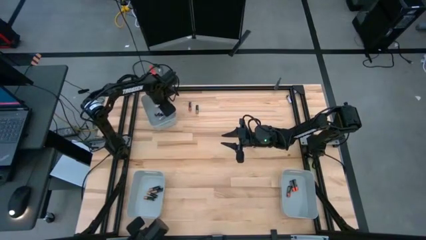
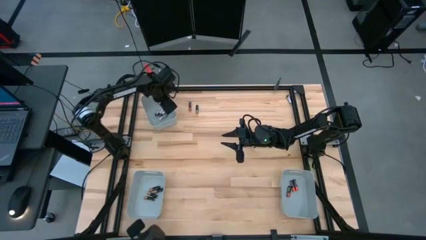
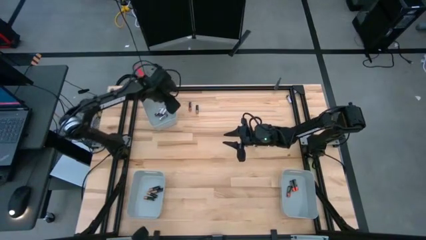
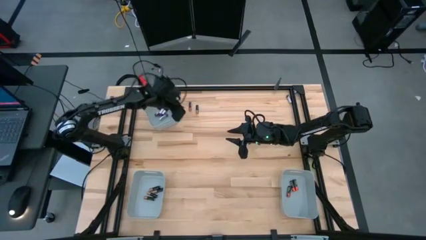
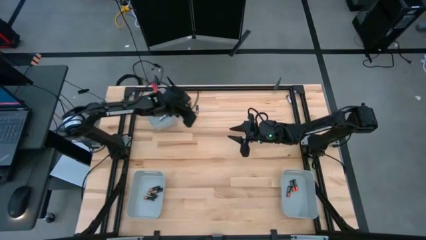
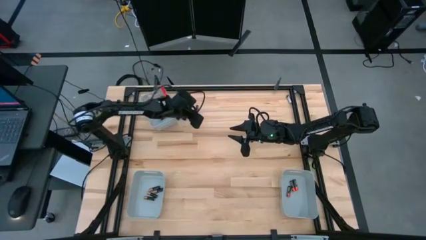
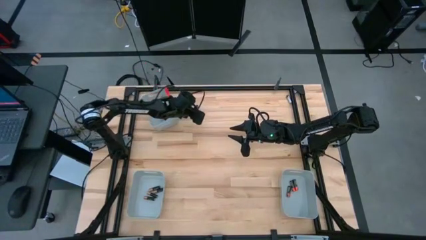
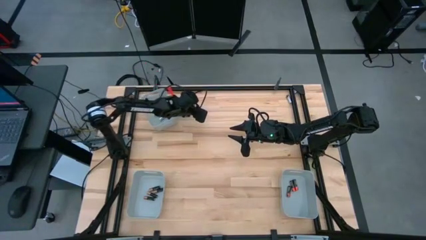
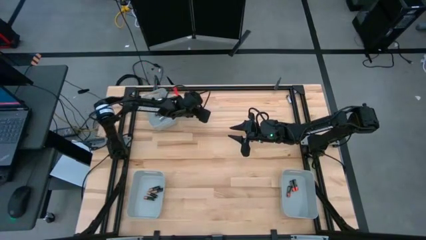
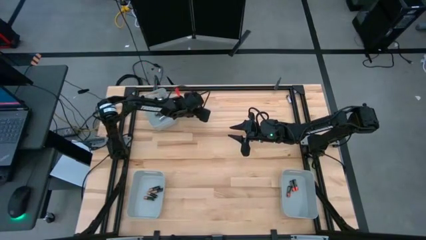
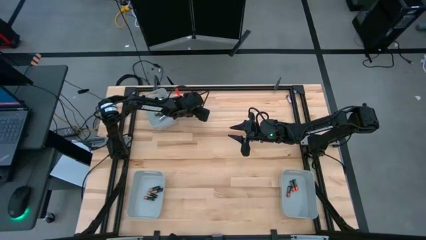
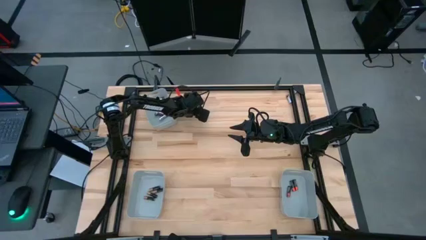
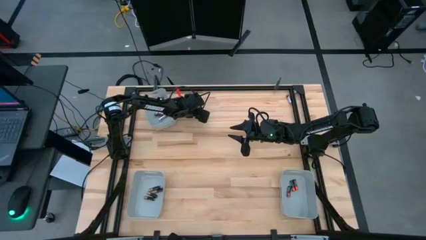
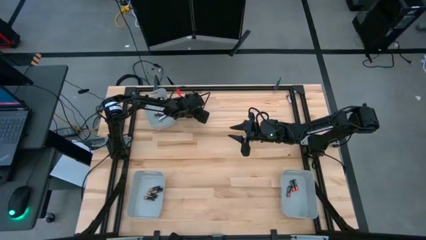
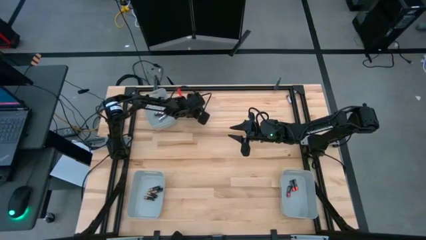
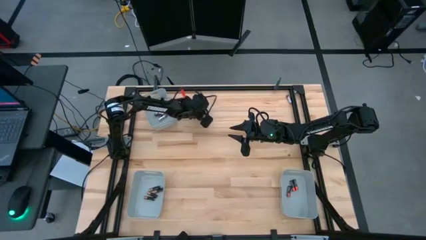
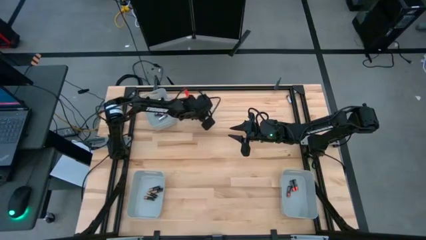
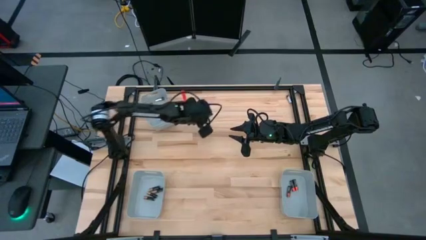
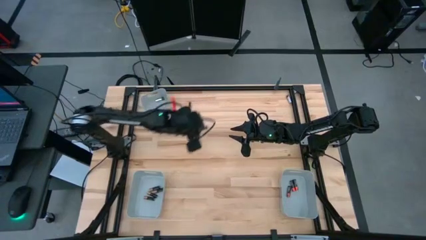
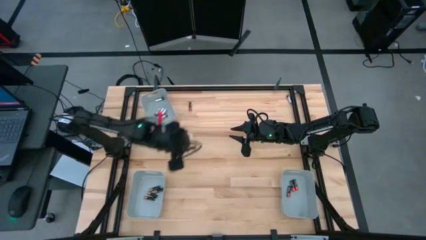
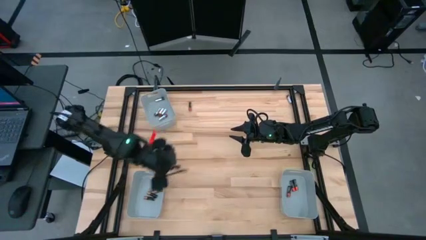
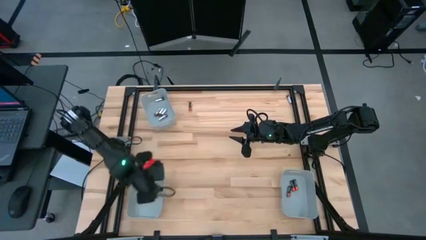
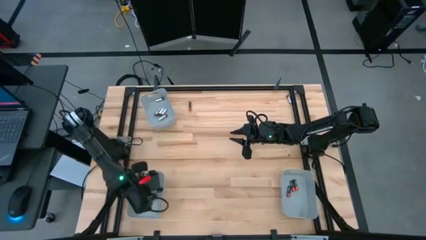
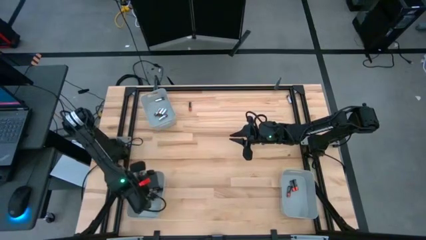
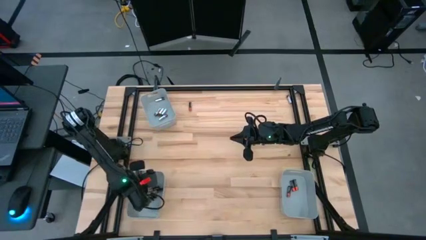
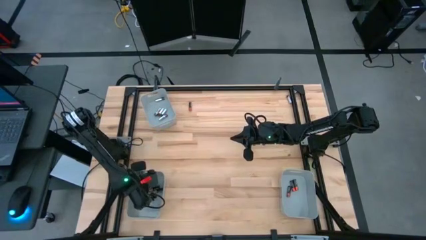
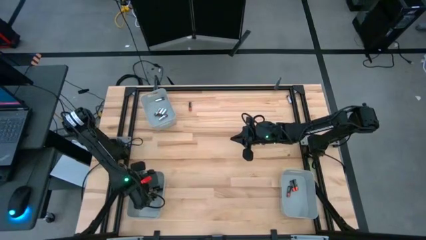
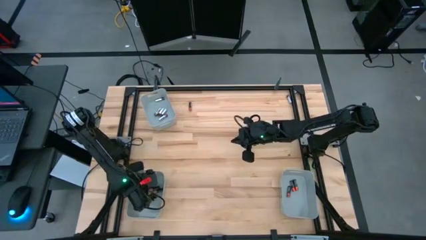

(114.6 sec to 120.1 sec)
Task: Sort batteries
Put the black-brown battery into the bottom left gray bin

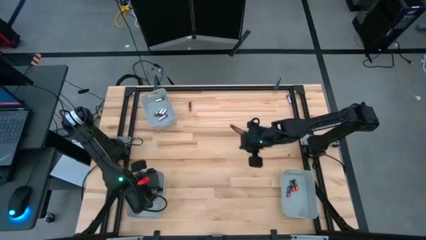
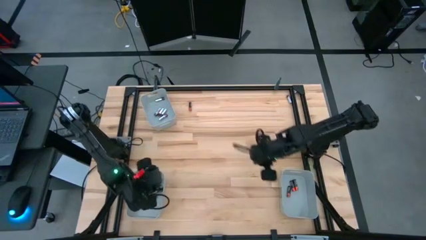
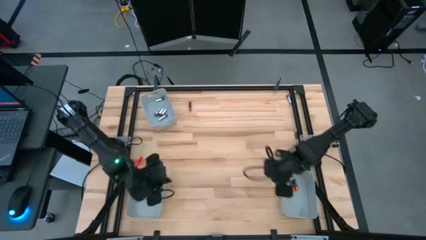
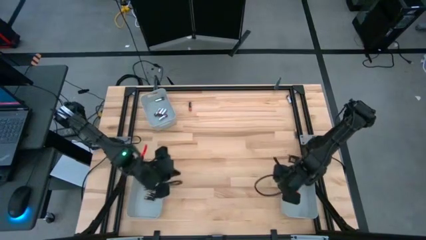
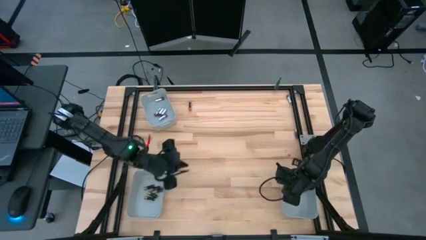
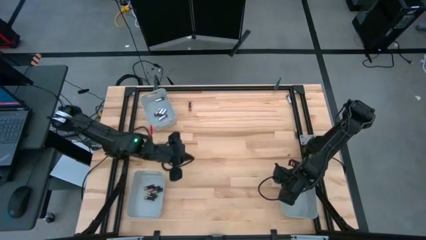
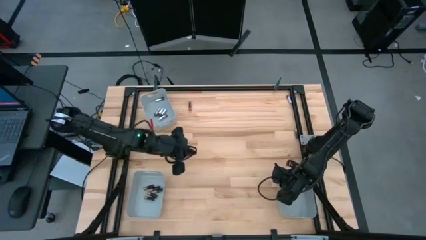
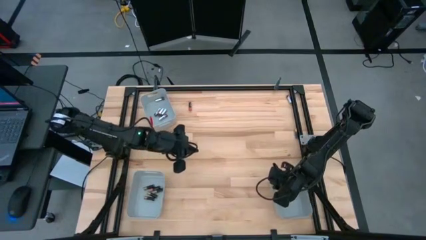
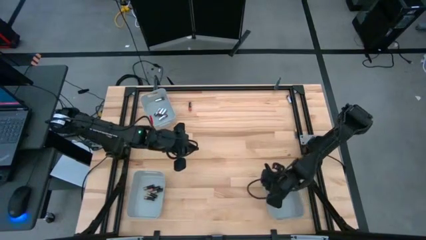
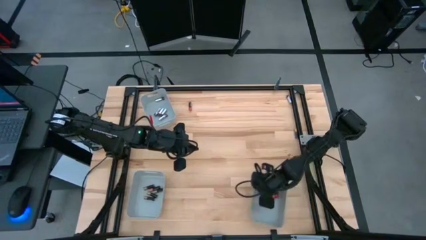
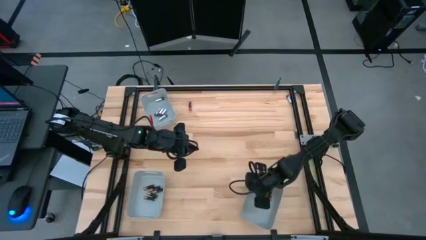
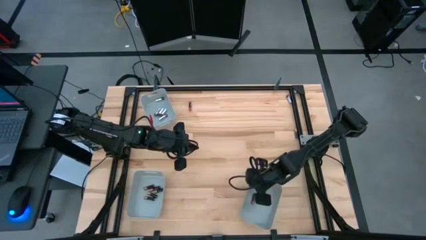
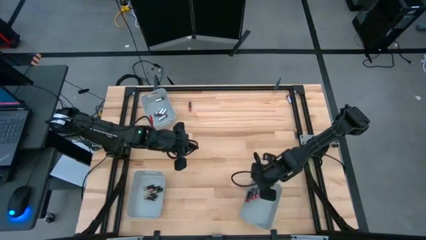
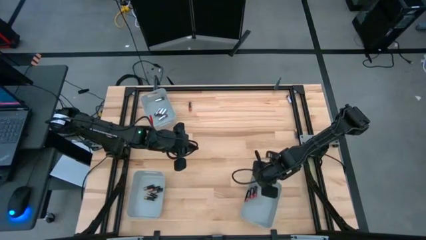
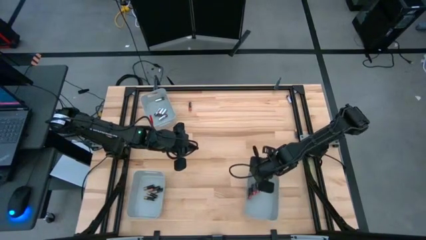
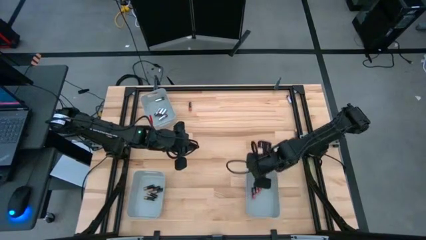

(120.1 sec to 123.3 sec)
Adjust the bottom right gray bin

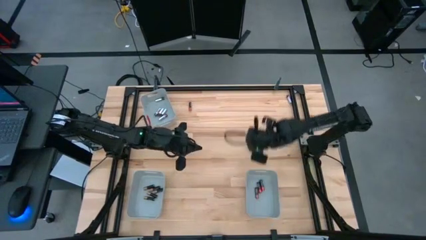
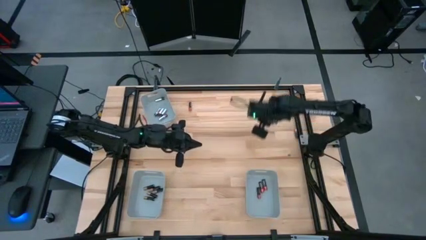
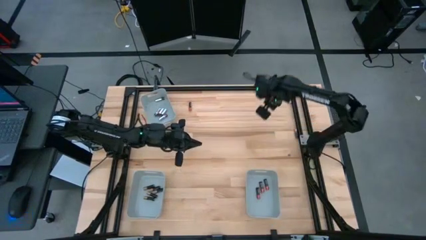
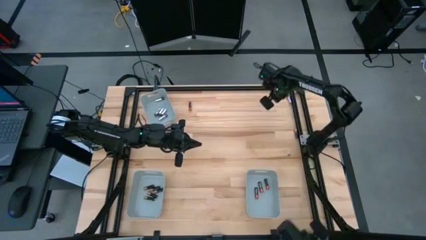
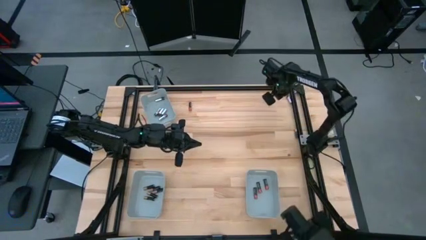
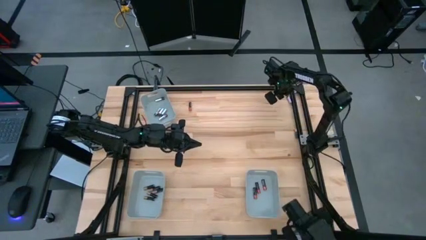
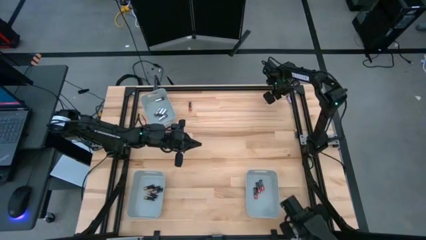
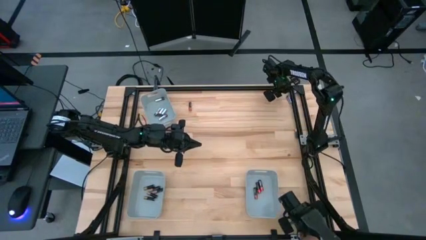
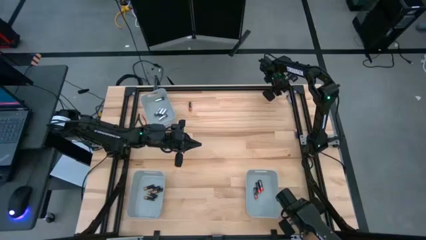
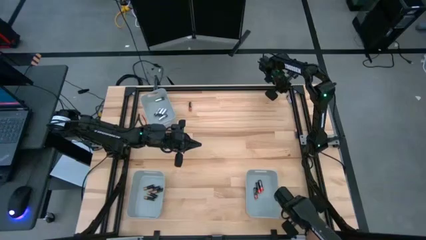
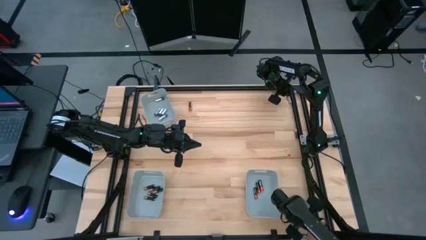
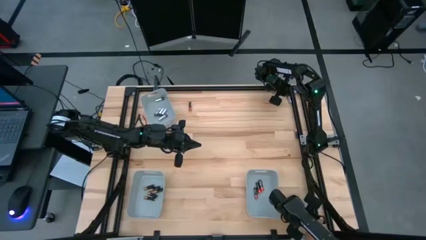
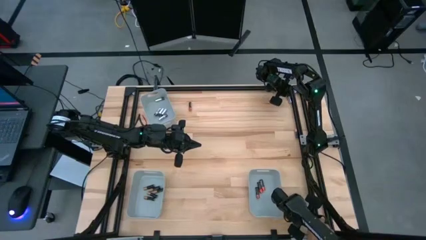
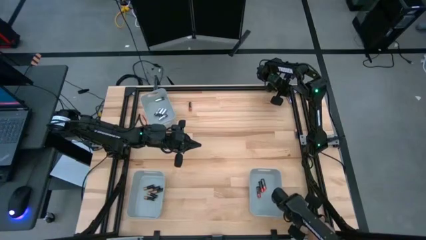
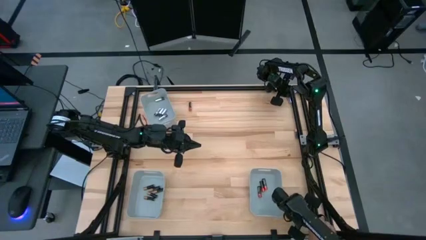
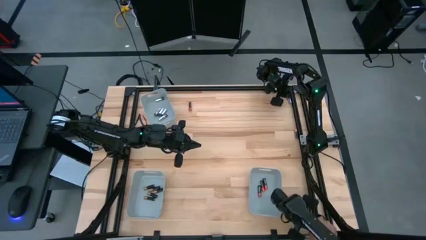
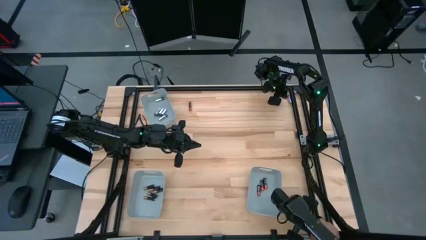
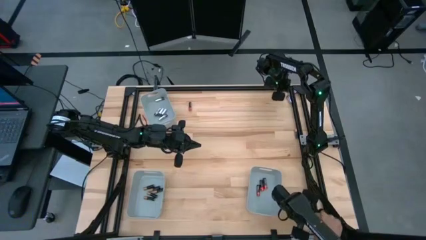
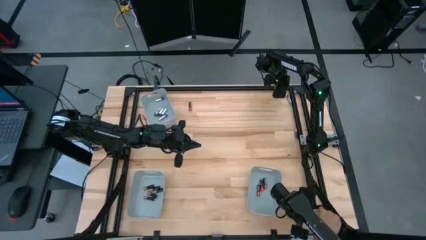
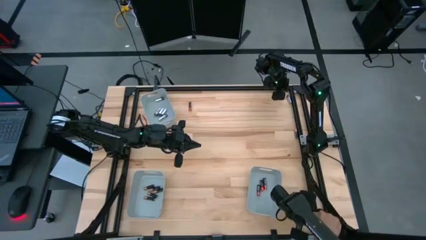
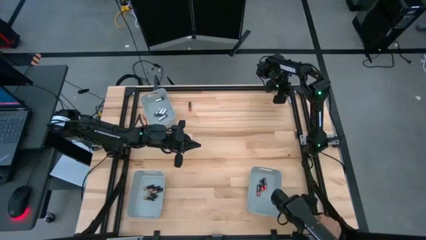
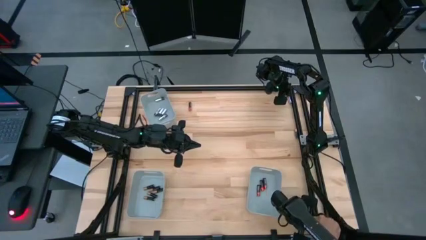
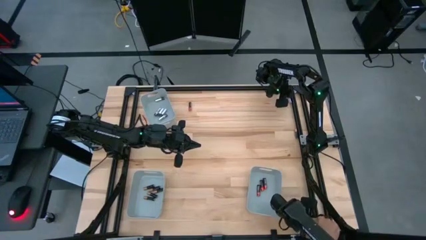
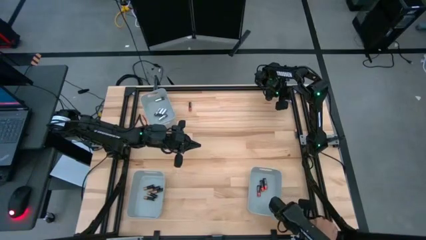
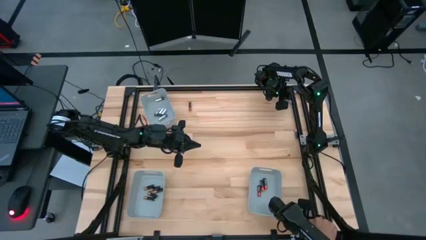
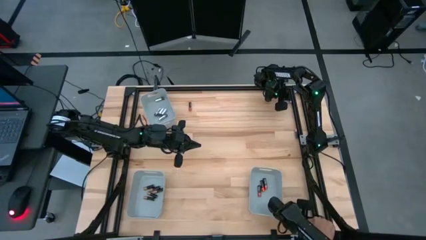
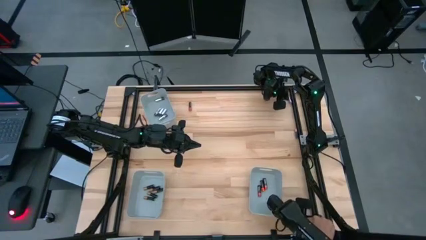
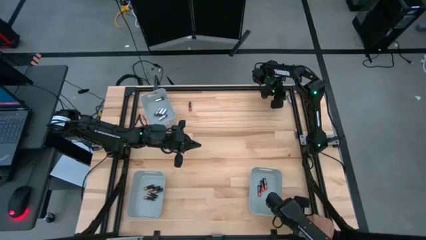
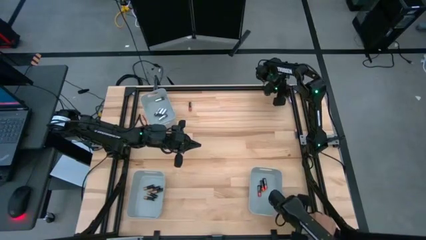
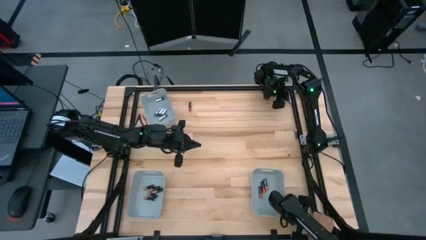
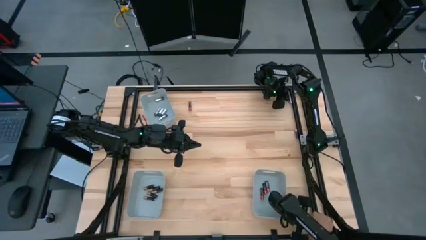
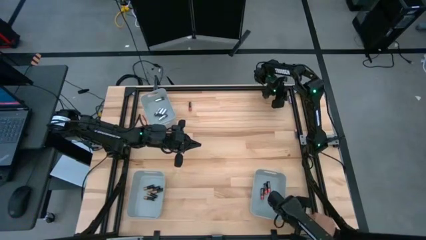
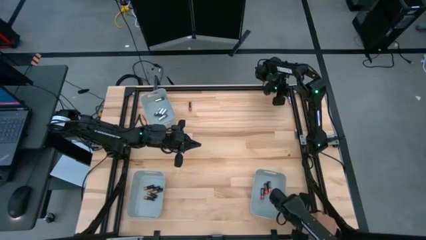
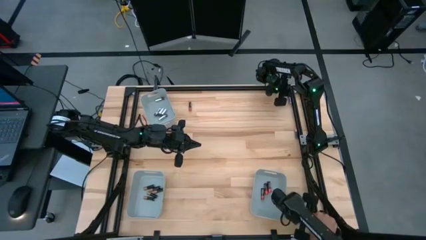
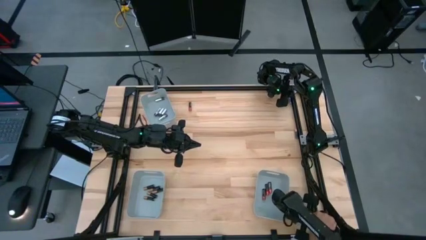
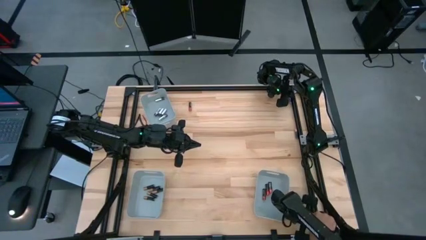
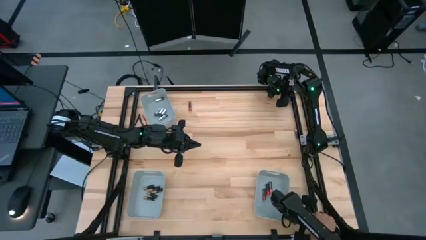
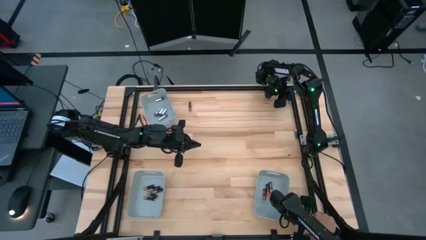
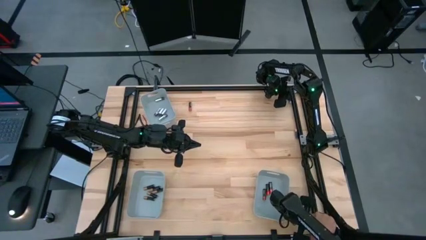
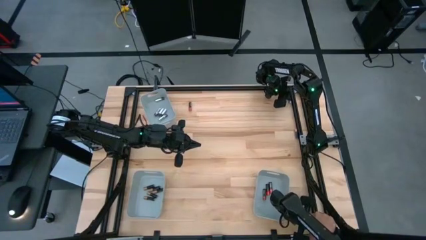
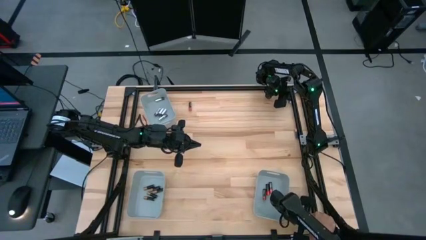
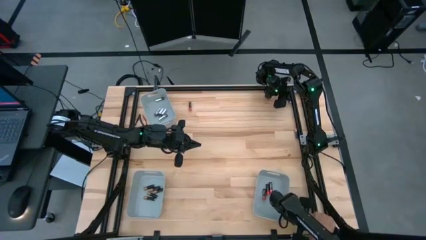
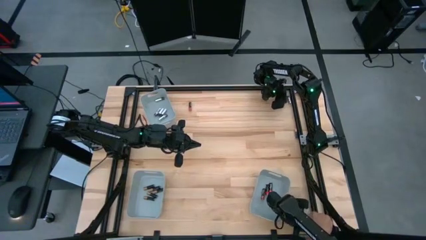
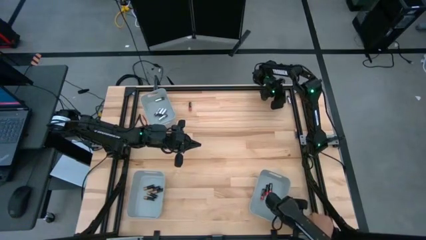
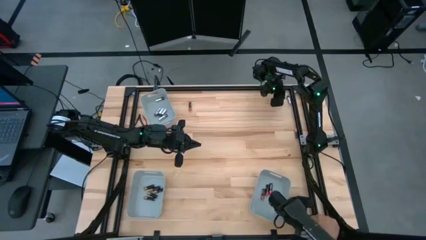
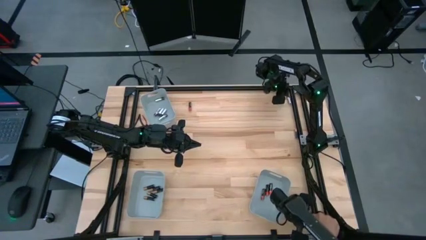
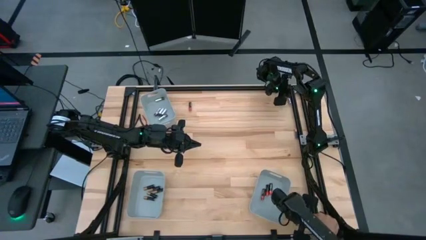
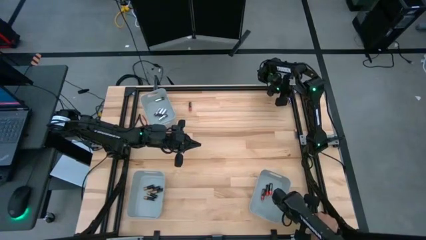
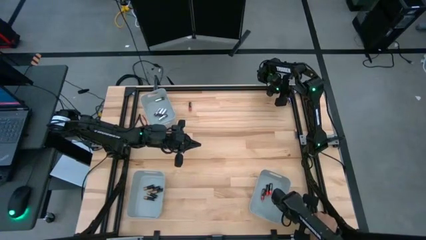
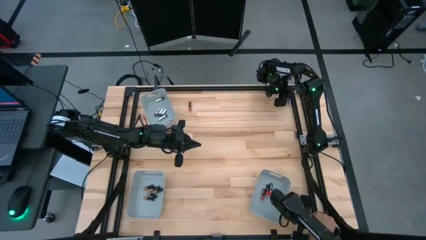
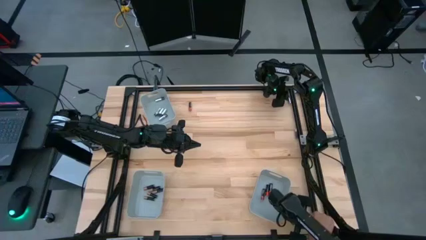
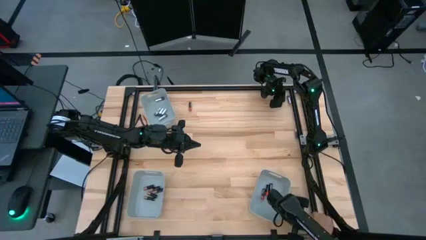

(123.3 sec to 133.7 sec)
Put the silver battery into the top left gray bin
